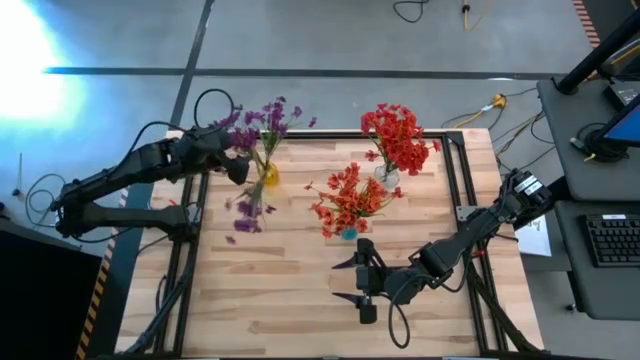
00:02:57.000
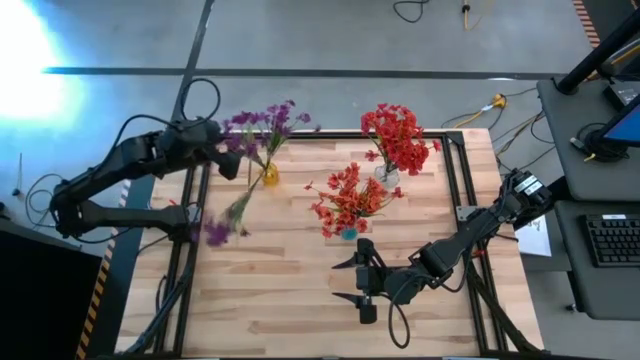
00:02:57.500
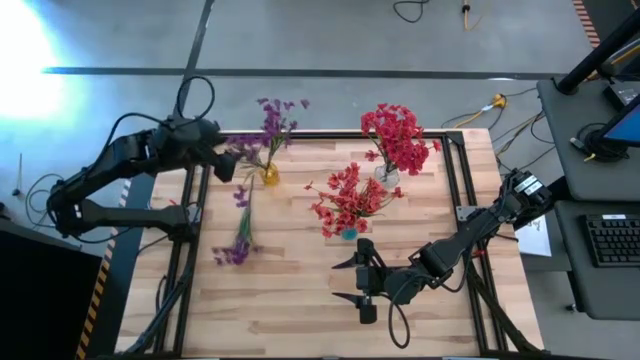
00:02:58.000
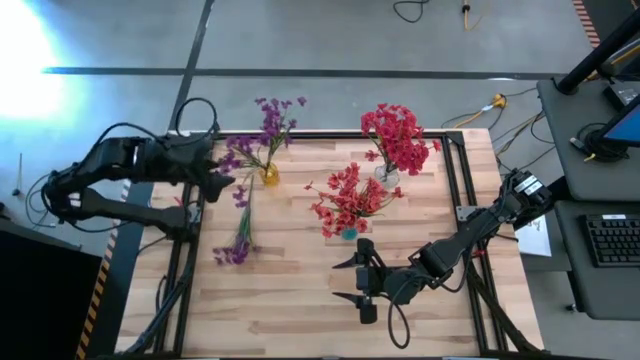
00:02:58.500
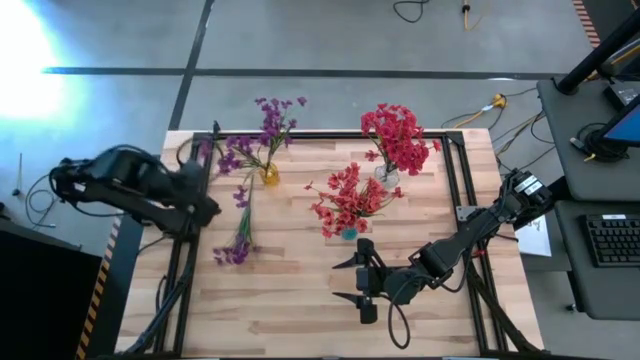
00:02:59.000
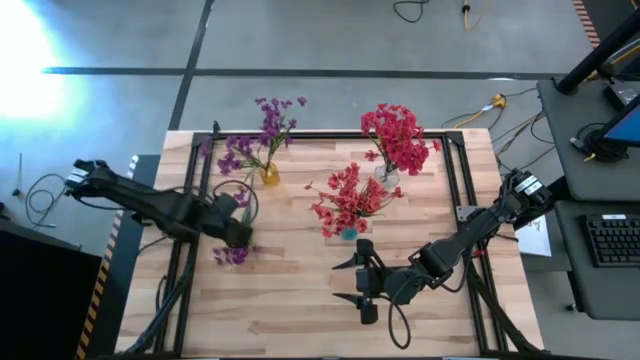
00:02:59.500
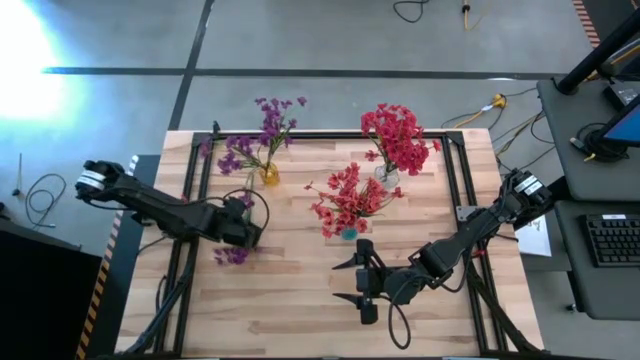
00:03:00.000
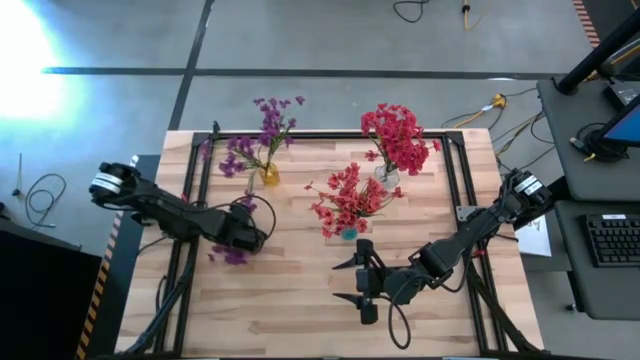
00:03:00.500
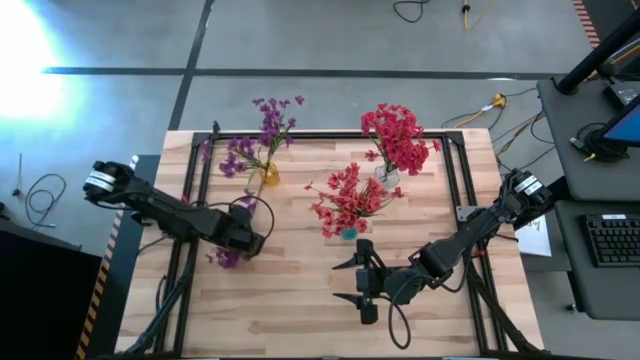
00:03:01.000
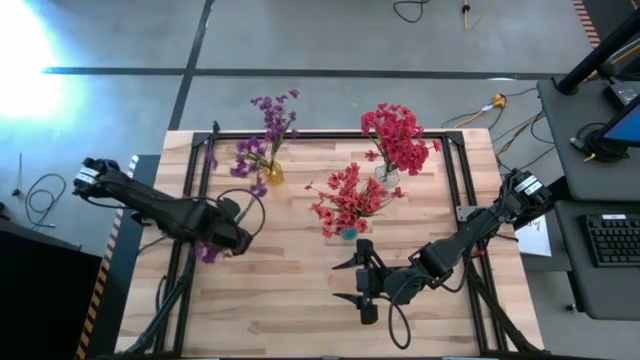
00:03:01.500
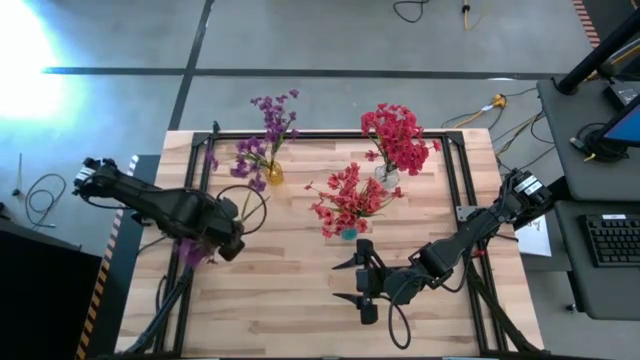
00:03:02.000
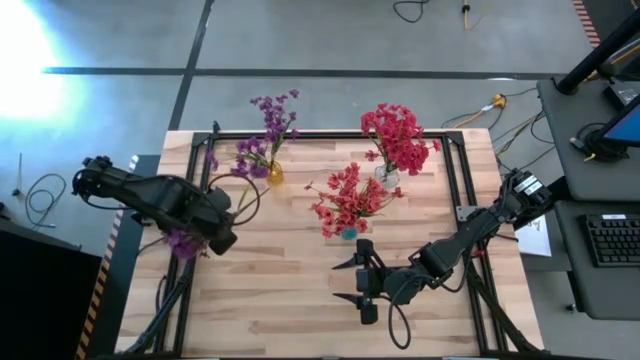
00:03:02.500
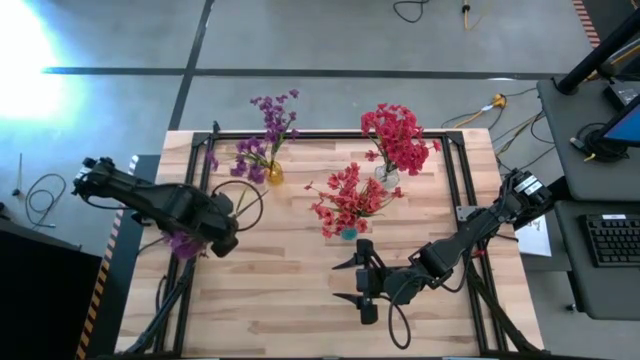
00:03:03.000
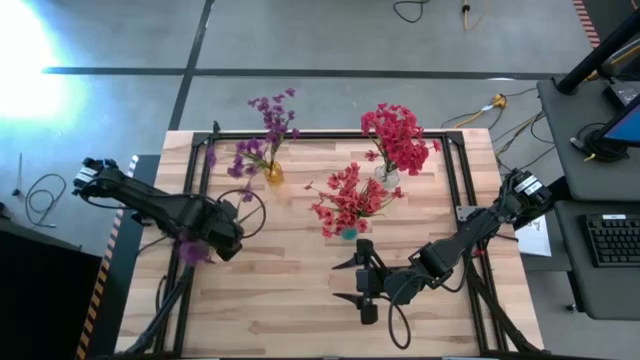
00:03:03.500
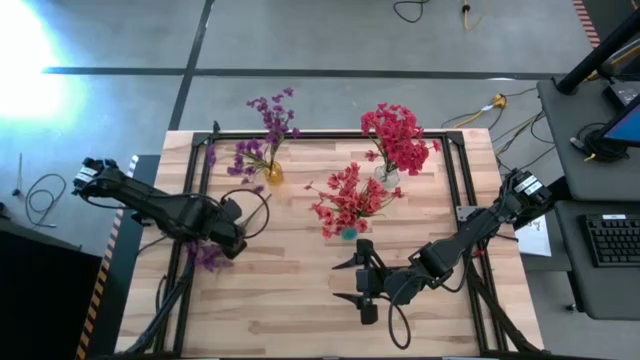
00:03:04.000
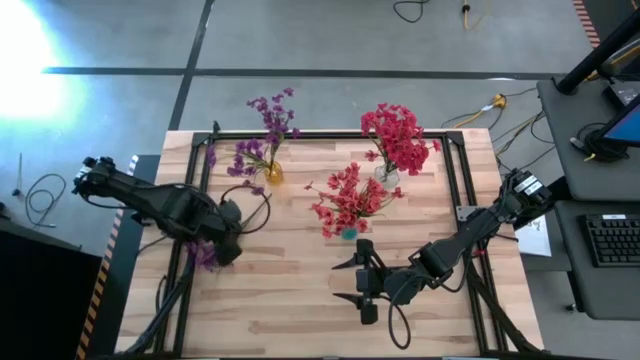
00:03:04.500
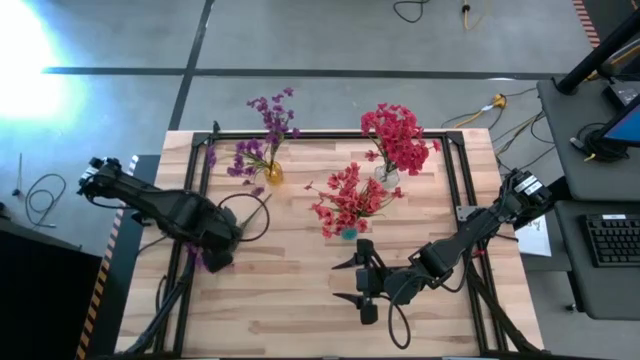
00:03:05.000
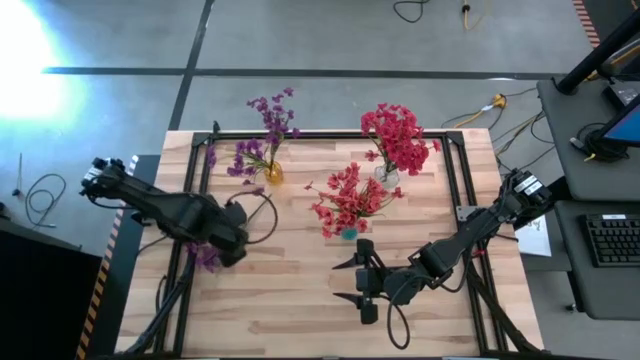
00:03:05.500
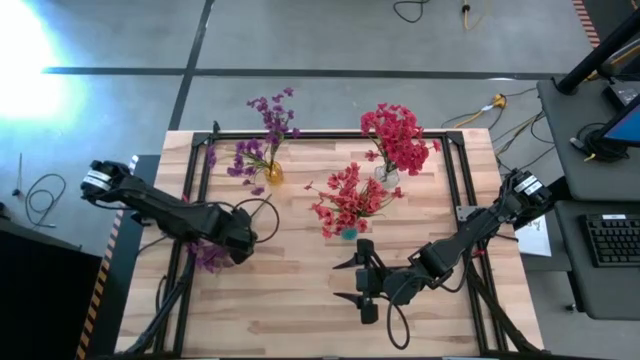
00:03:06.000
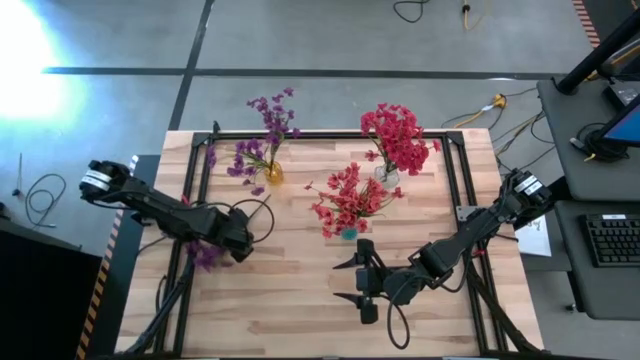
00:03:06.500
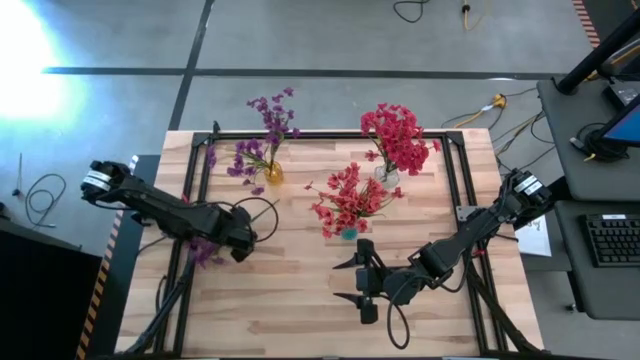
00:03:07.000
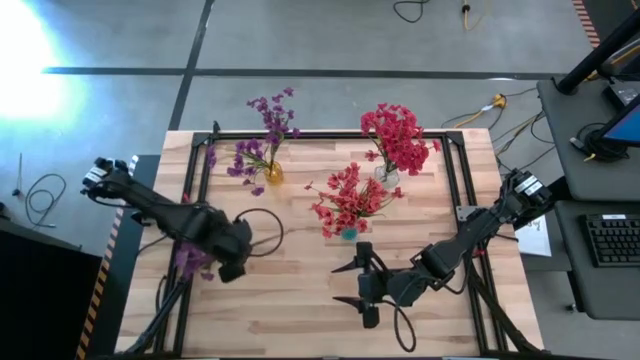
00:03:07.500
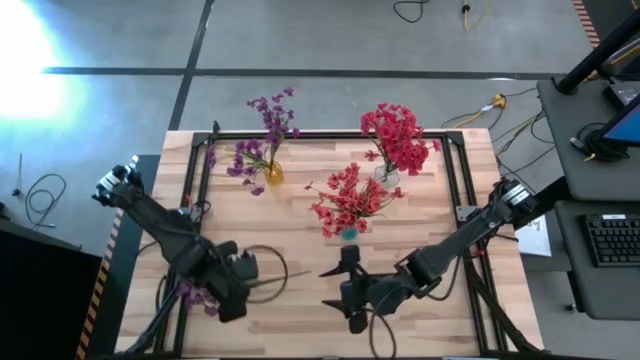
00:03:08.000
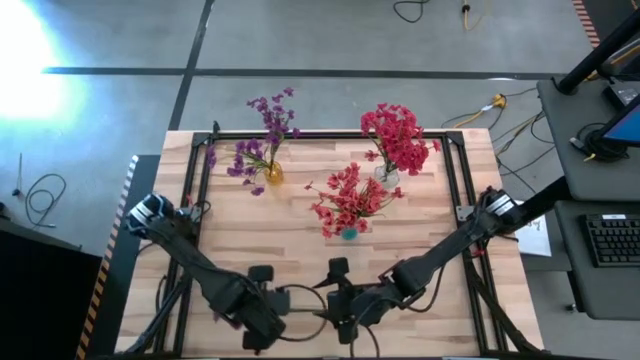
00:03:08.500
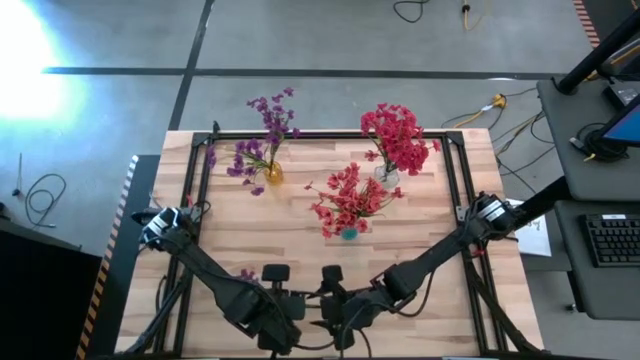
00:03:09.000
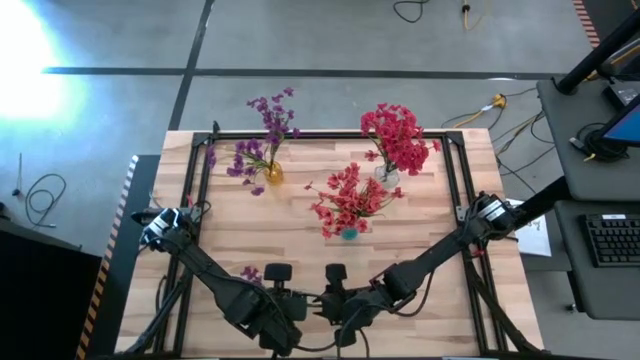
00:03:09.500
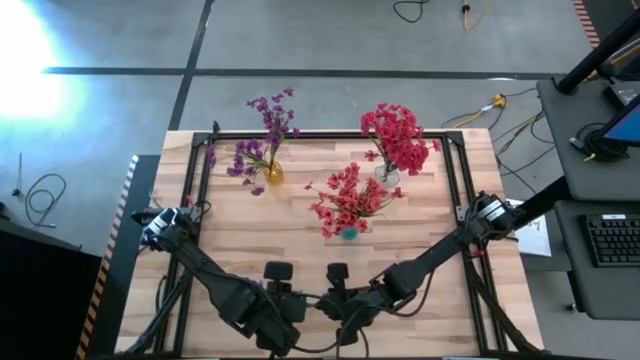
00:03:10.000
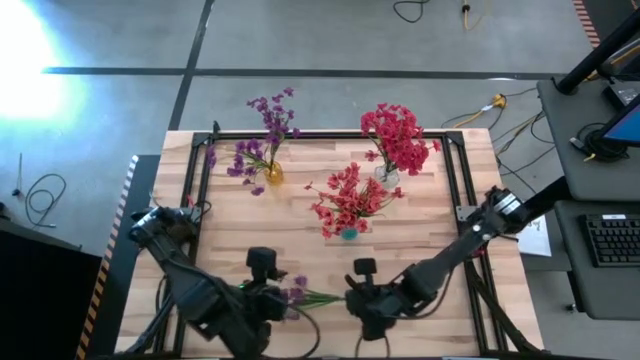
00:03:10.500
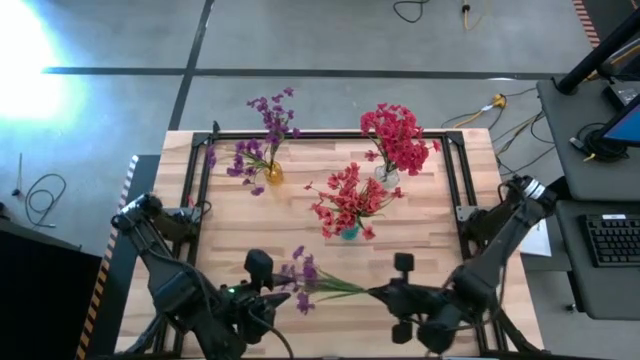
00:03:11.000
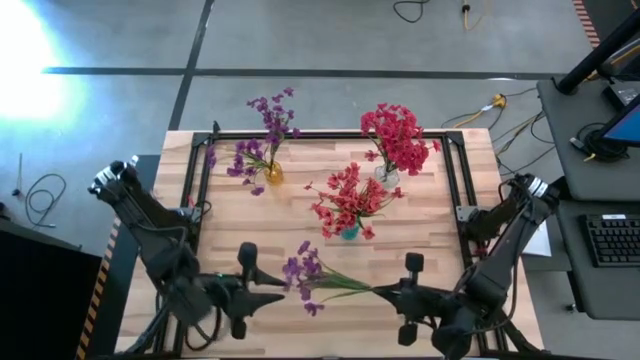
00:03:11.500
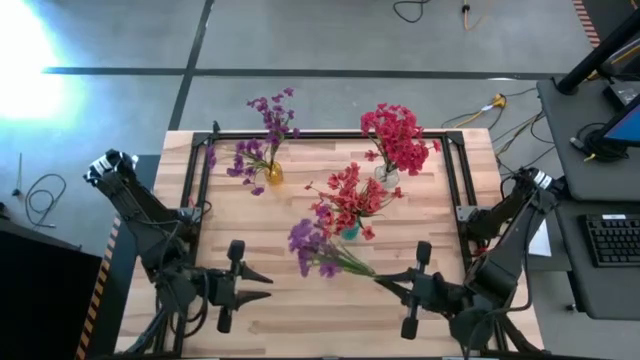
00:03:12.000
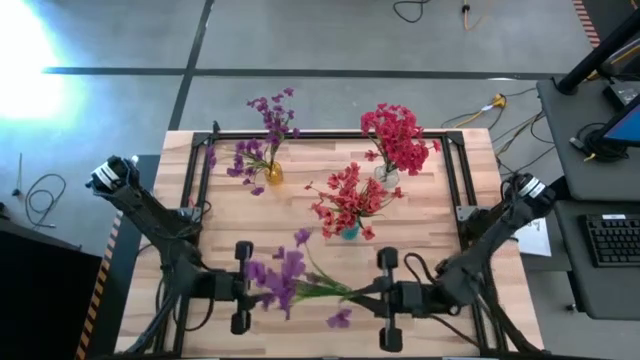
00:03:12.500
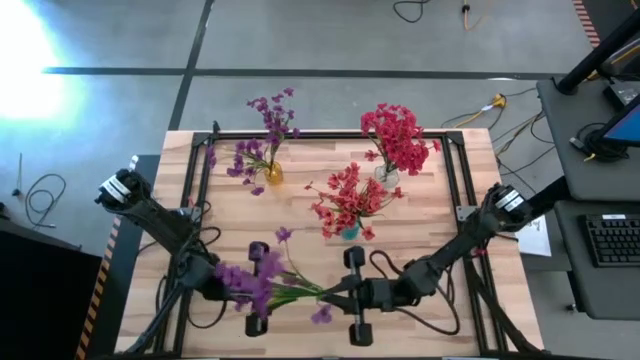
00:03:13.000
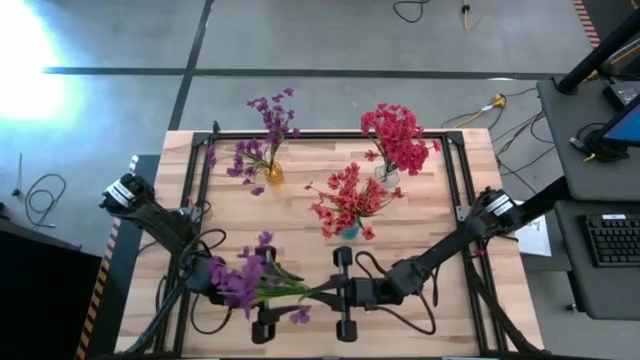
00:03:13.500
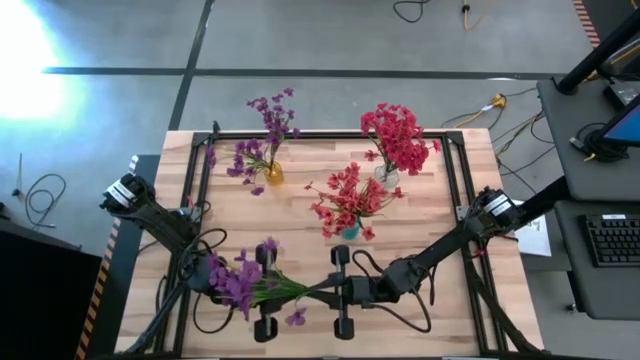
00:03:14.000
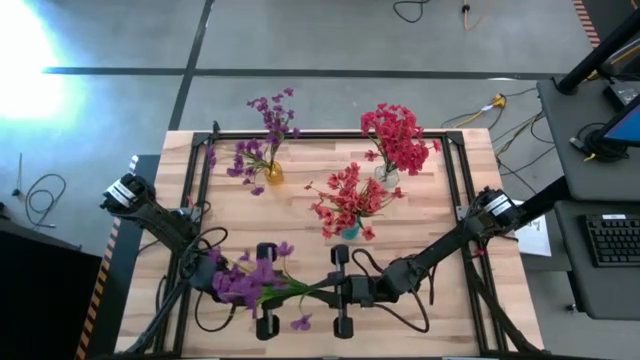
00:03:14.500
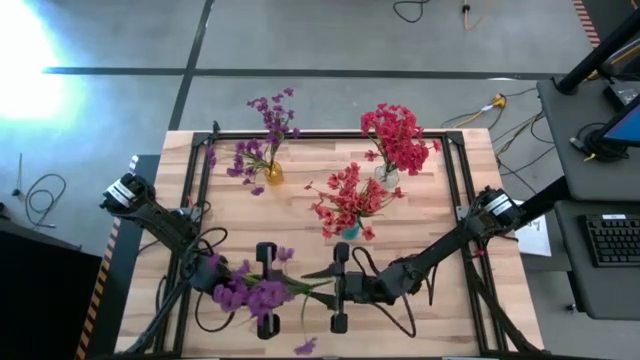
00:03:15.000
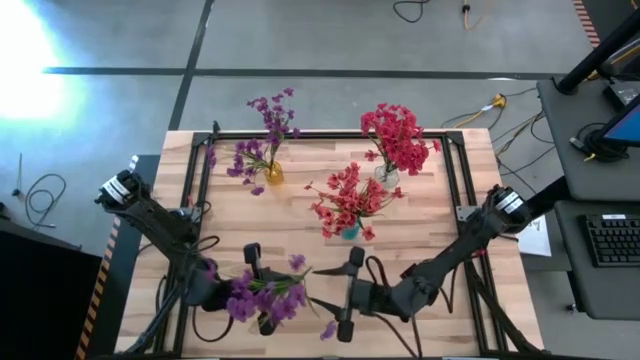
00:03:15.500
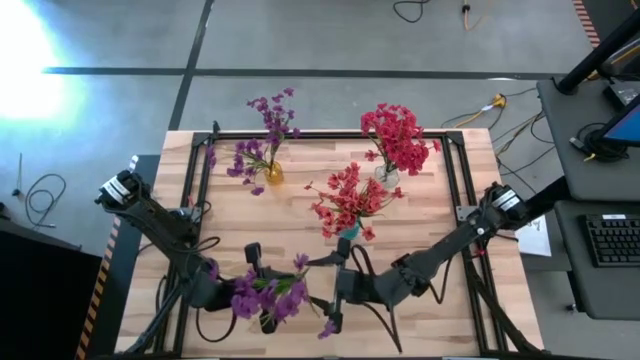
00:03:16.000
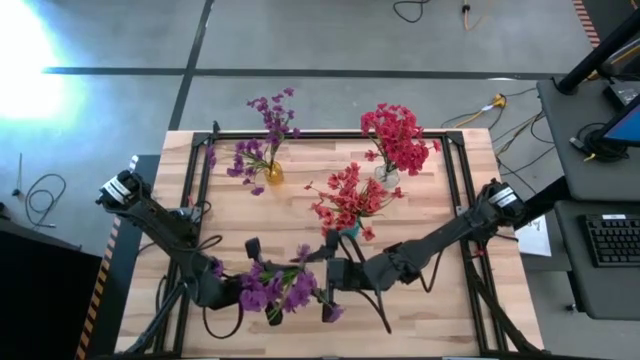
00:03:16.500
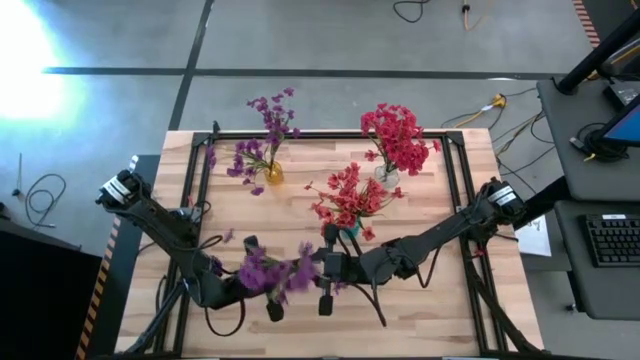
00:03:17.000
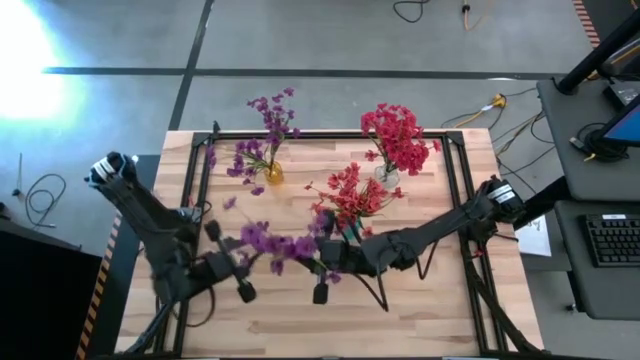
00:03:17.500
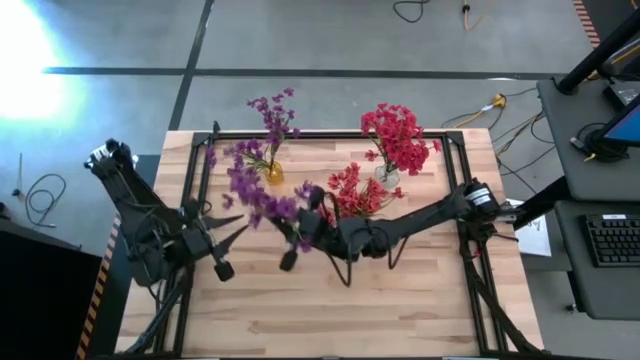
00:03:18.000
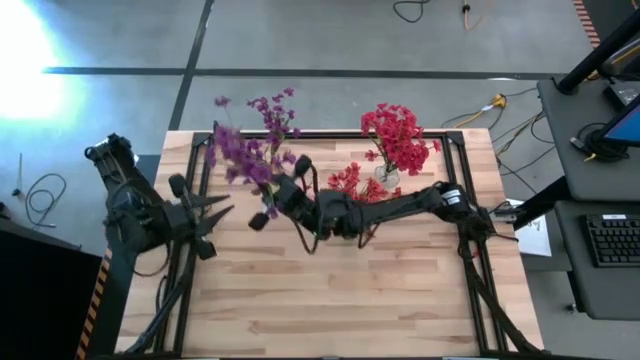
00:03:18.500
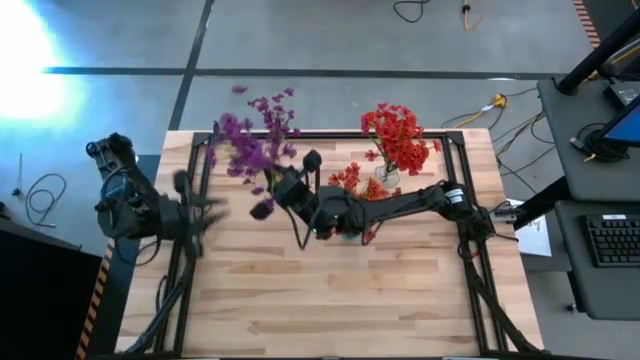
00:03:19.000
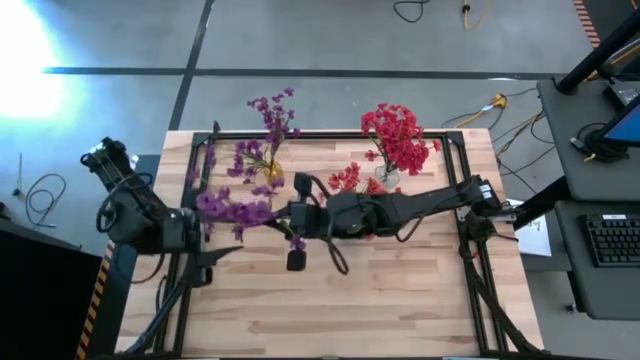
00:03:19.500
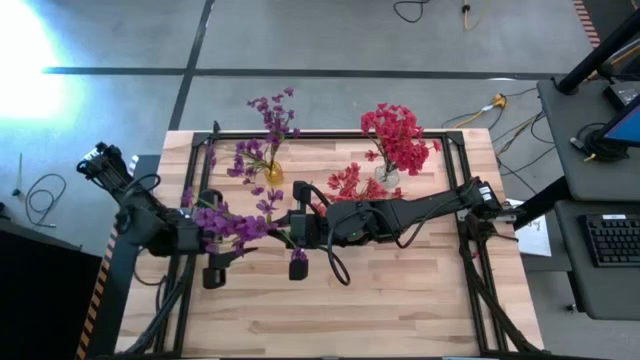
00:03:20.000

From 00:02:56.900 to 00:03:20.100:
Task: Sort flowers into vase by color
Put the violet flowers into the yellow vase
